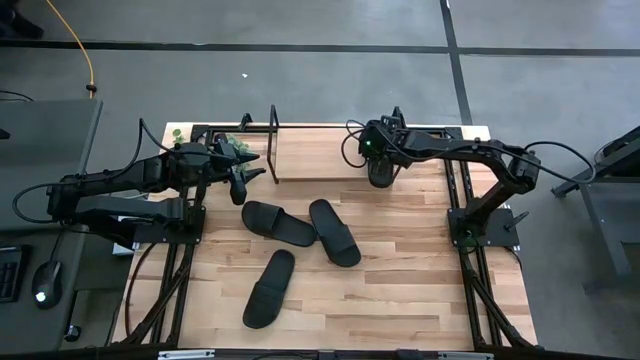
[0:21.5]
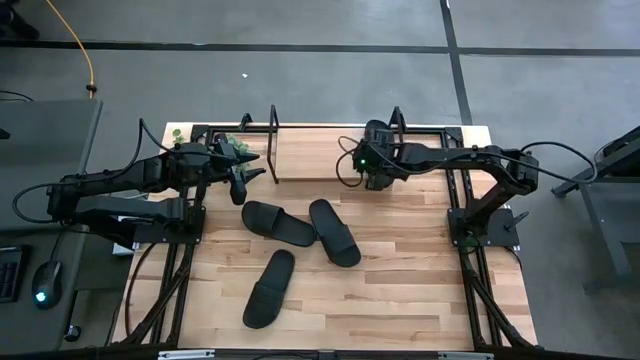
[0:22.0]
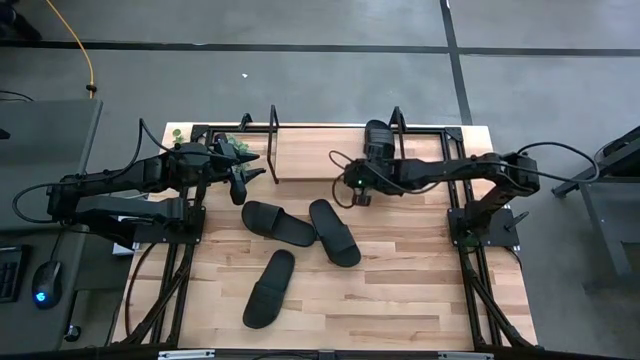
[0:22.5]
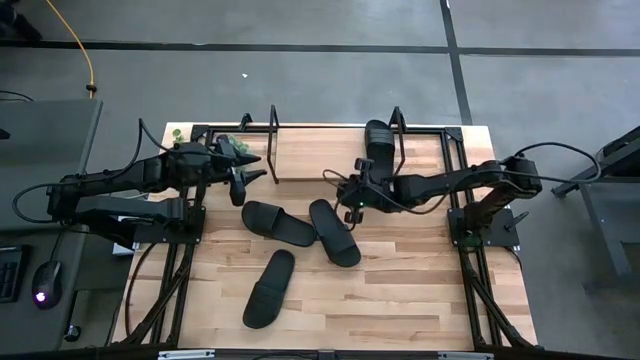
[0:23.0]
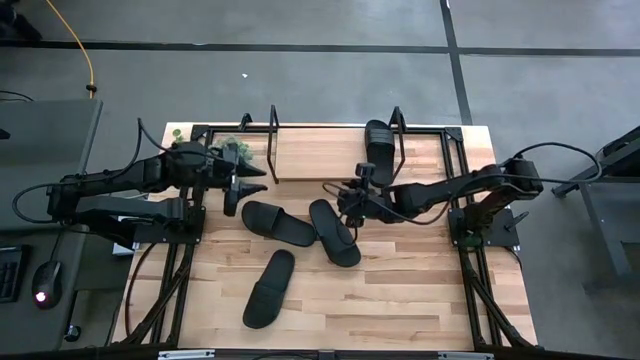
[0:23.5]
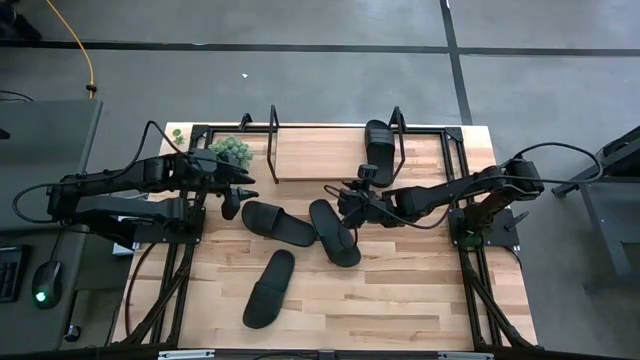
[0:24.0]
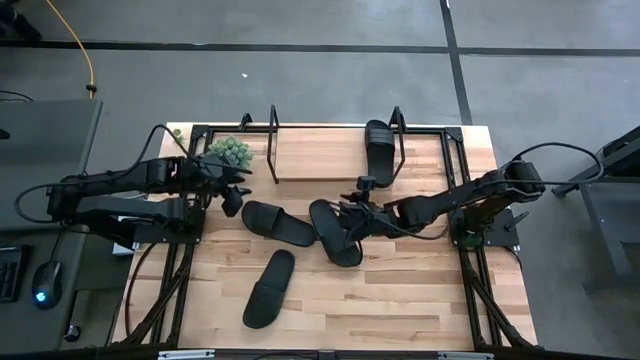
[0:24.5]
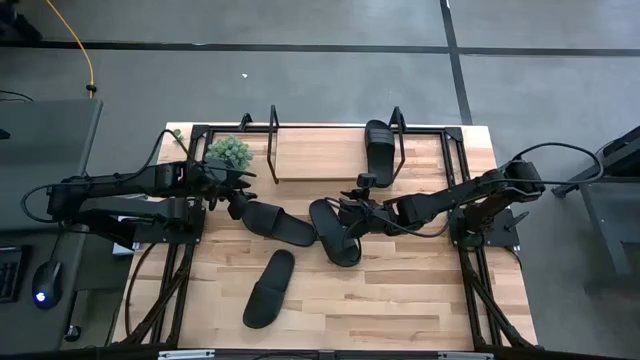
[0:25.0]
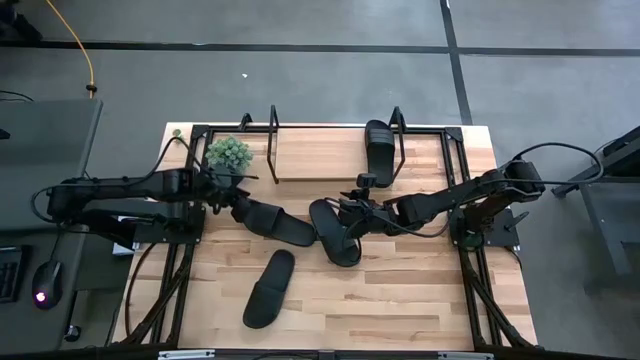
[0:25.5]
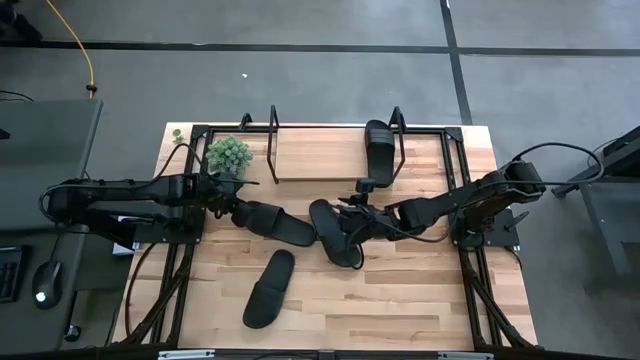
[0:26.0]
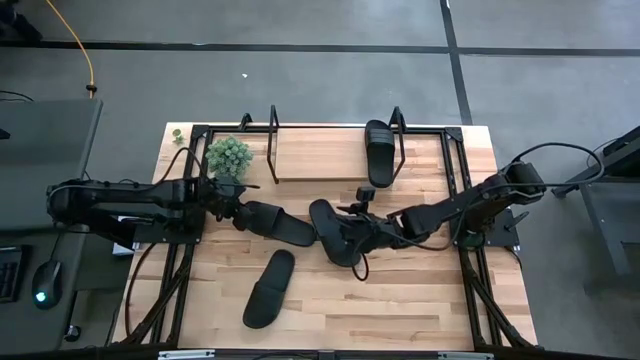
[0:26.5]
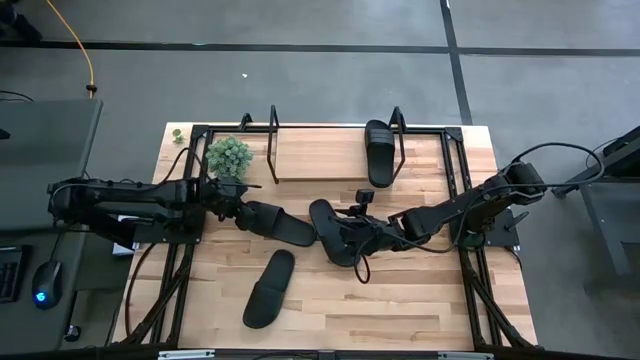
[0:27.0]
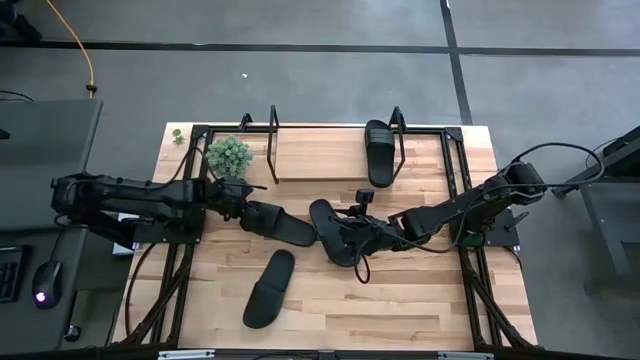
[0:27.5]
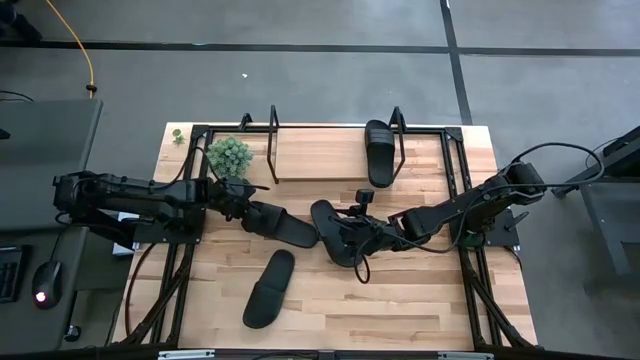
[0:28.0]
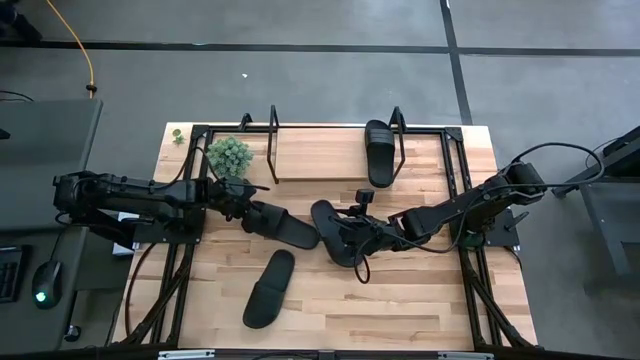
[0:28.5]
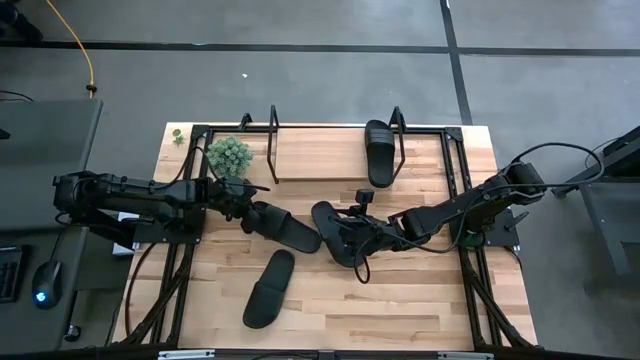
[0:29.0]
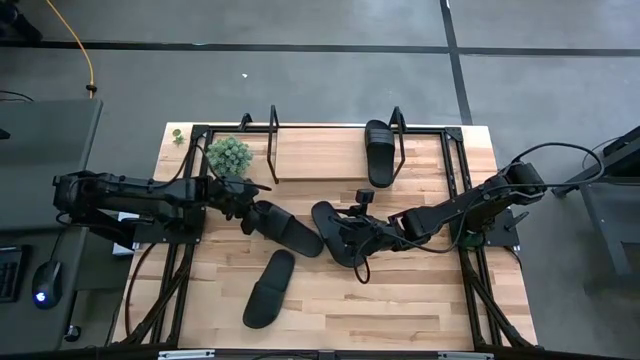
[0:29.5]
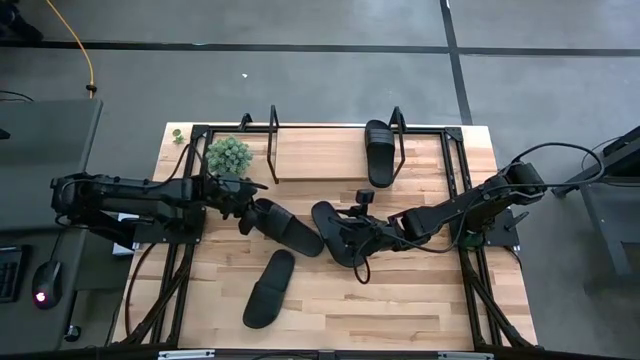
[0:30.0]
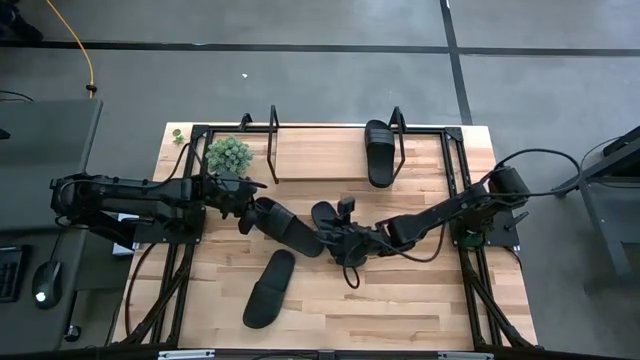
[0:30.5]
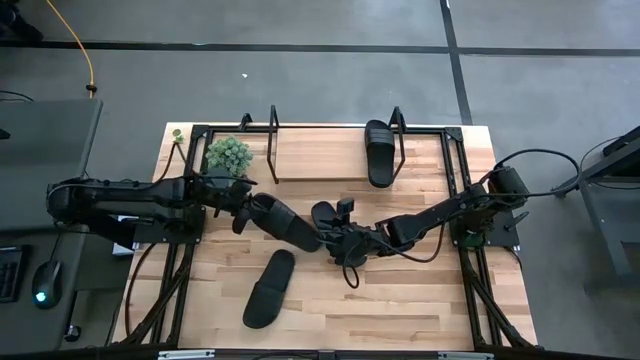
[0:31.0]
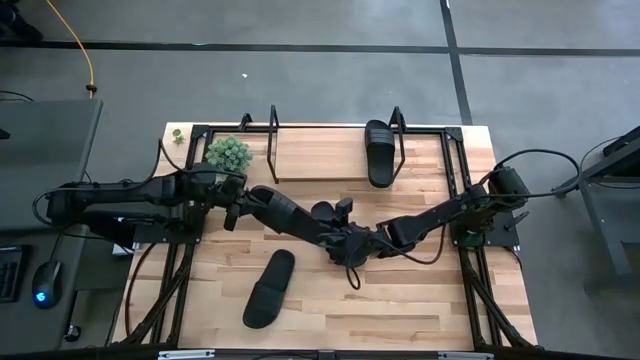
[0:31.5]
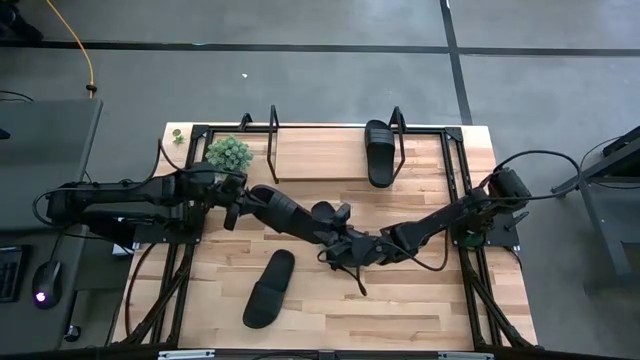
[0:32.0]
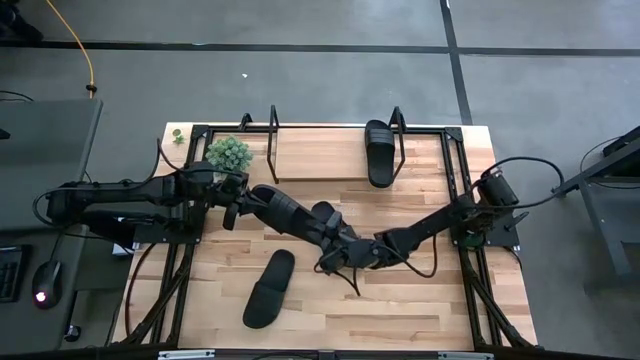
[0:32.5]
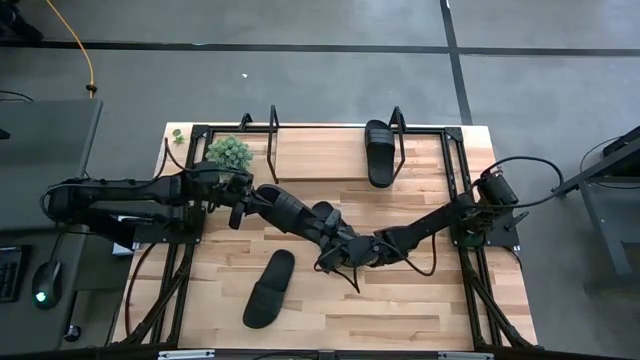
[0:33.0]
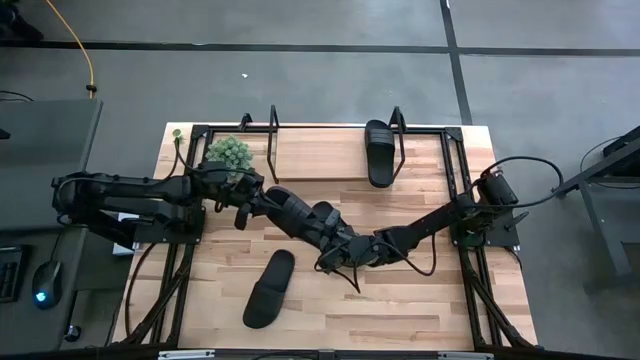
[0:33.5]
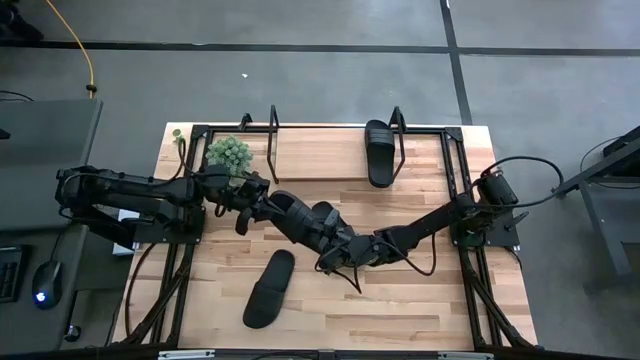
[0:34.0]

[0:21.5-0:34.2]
Task: Pick and place slides into the shelf
Put the black slide on the shelf

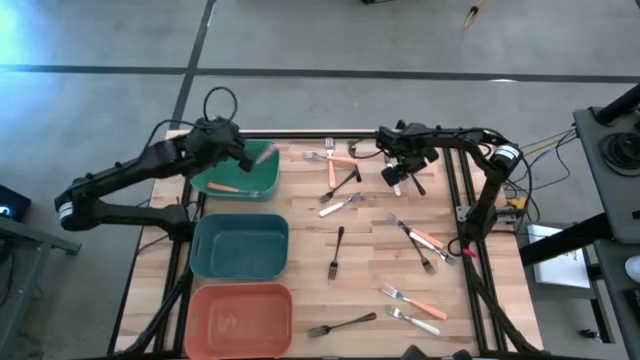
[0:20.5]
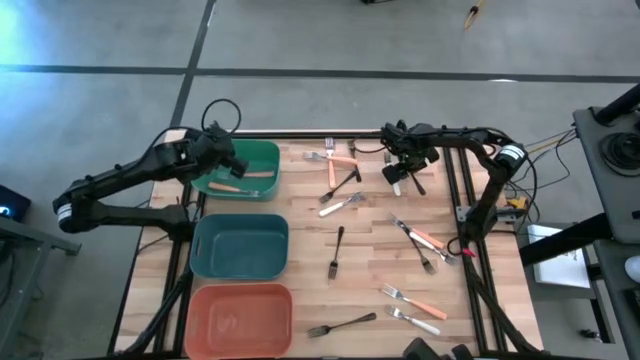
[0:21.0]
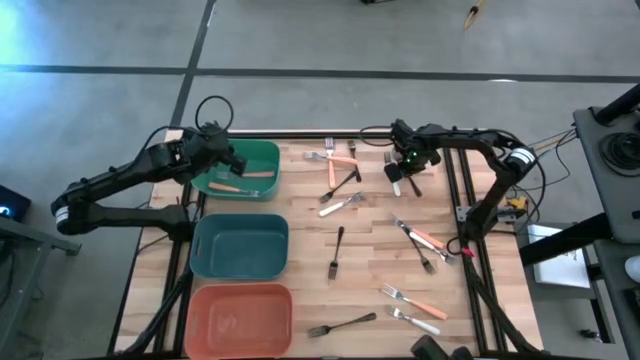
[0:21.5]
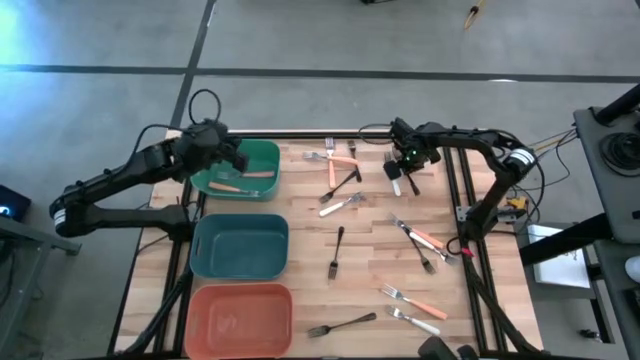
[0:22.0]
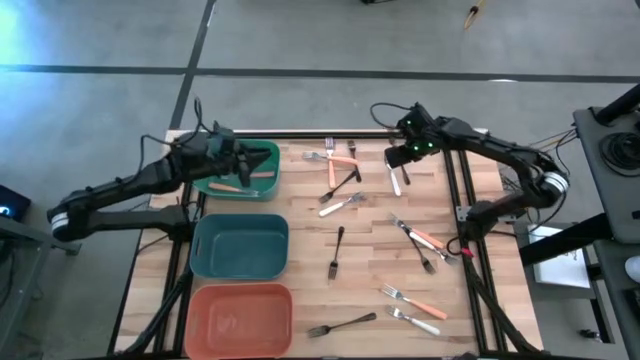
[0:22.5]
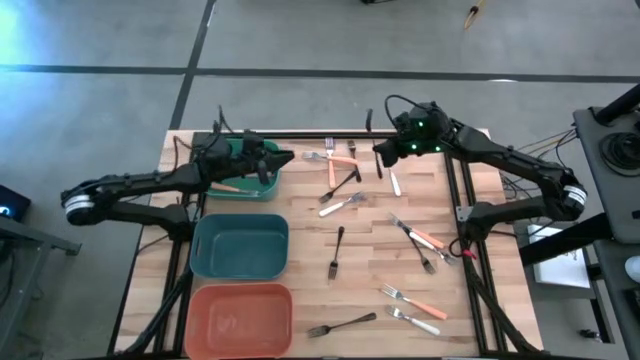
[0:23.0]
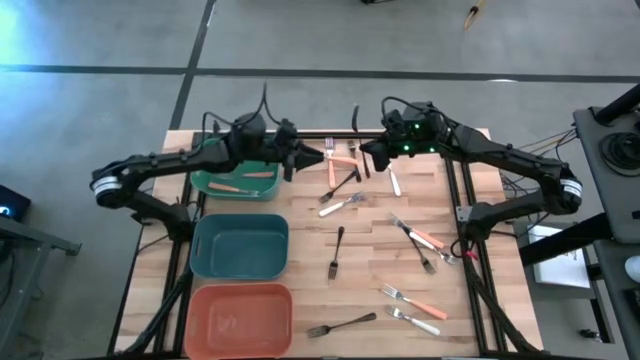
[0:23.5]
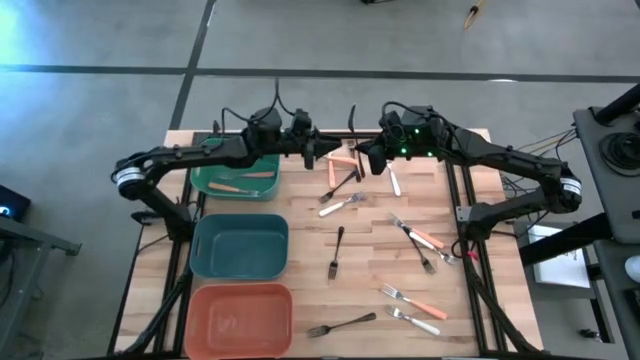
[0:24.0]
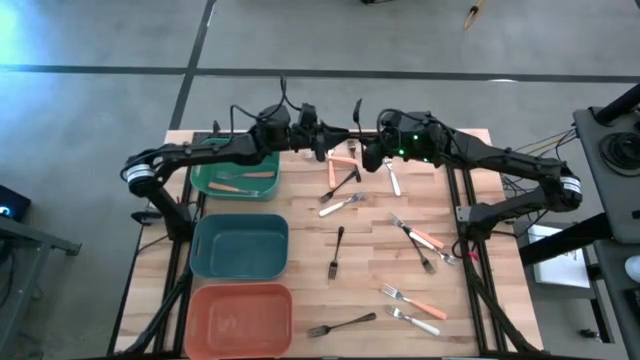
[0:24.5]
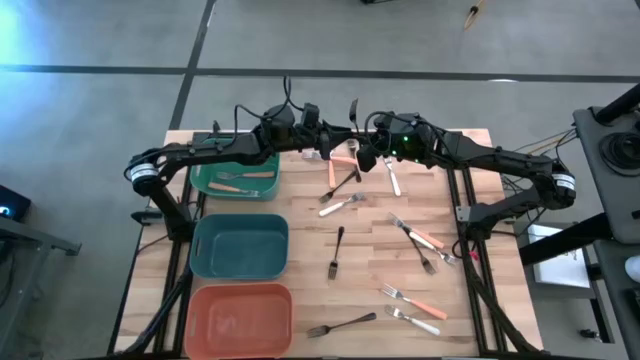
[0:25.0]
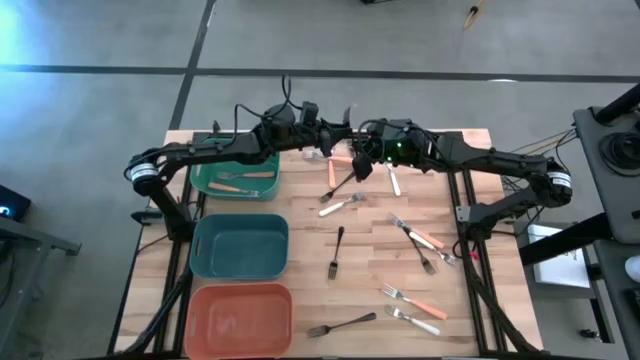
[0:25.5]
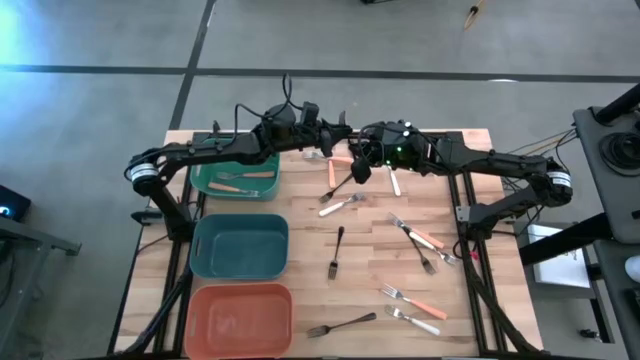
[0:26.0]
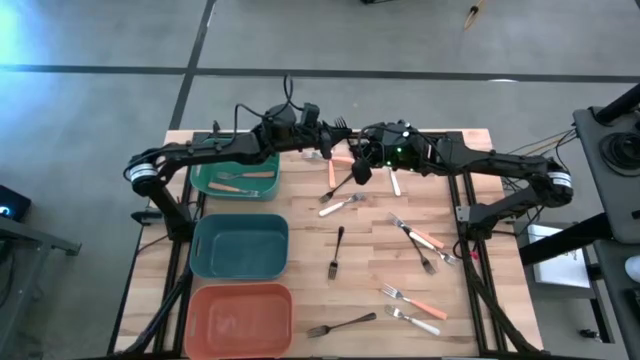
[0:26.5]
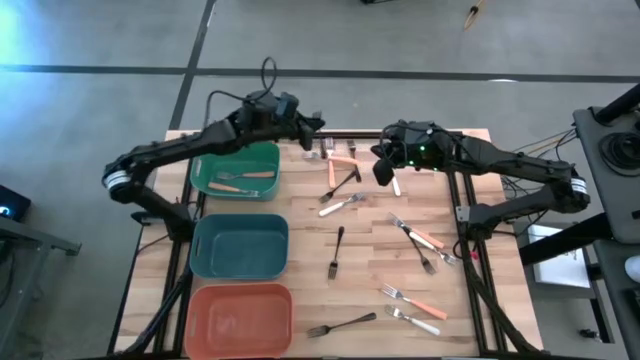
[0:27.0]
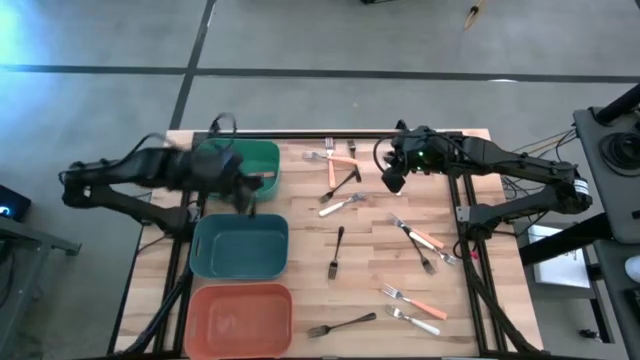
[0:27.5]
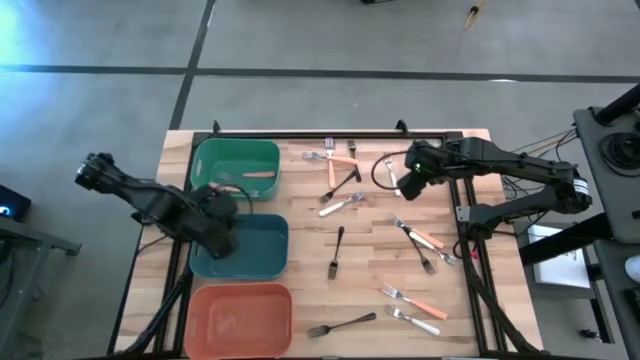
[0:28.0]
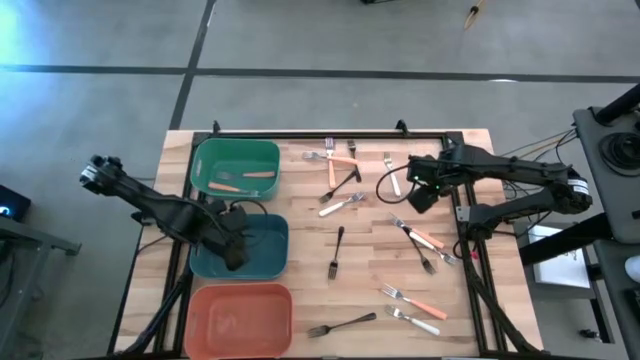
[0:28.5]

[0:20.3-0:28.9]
Task: Sort silverware by color (type)
Put the black fork into the blue bin
